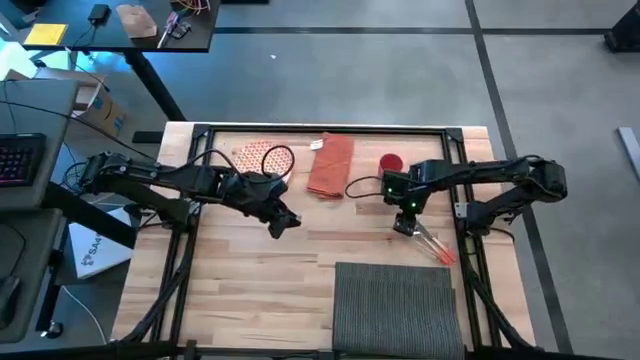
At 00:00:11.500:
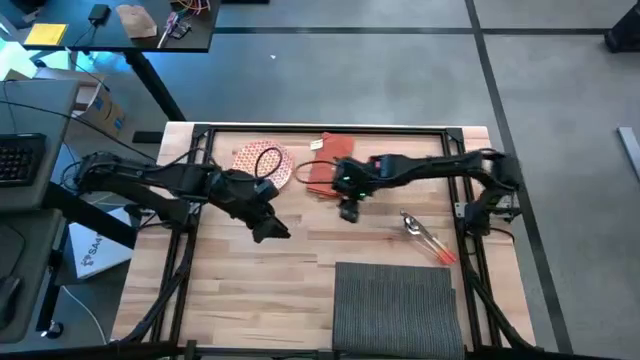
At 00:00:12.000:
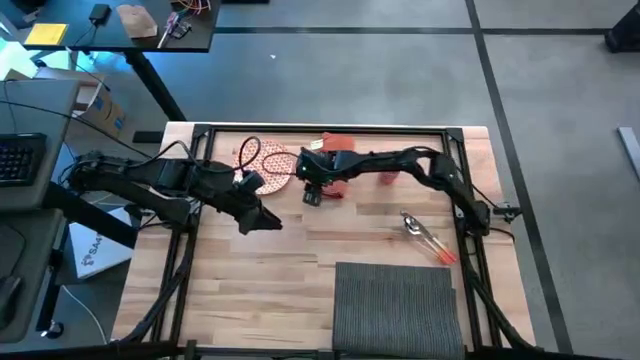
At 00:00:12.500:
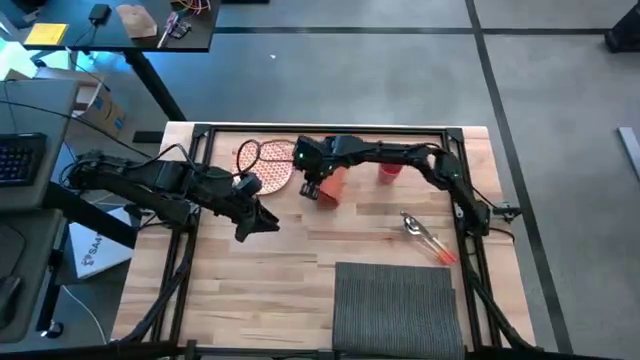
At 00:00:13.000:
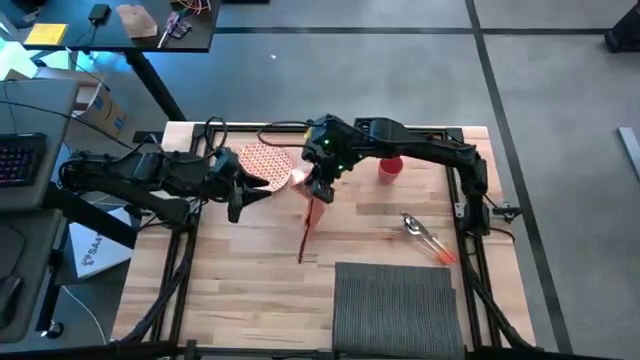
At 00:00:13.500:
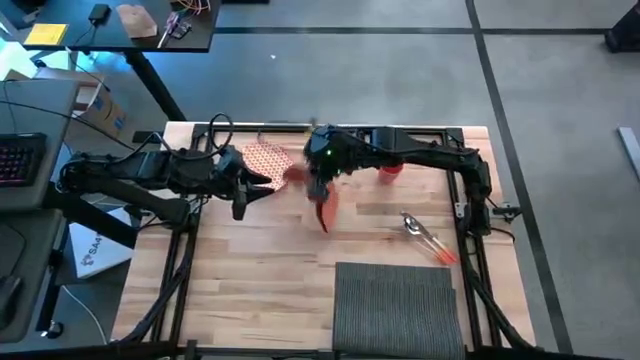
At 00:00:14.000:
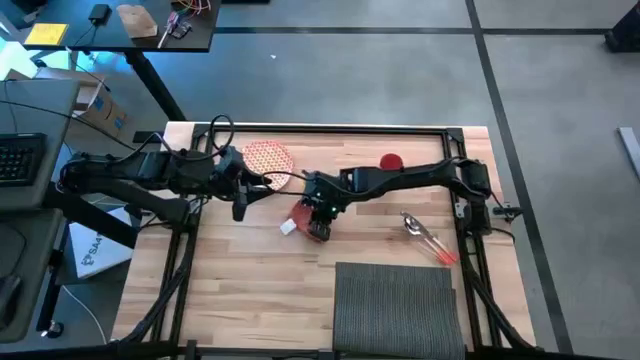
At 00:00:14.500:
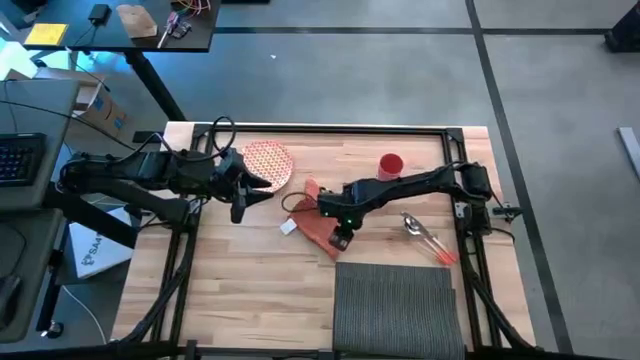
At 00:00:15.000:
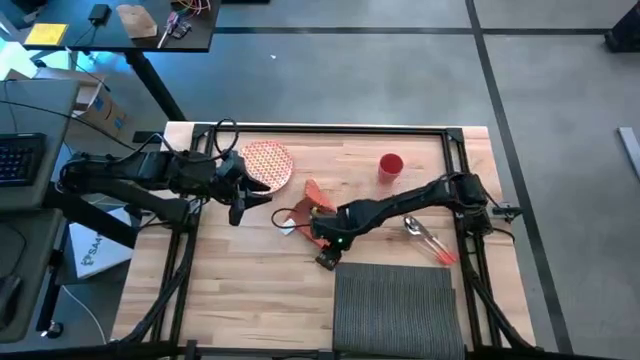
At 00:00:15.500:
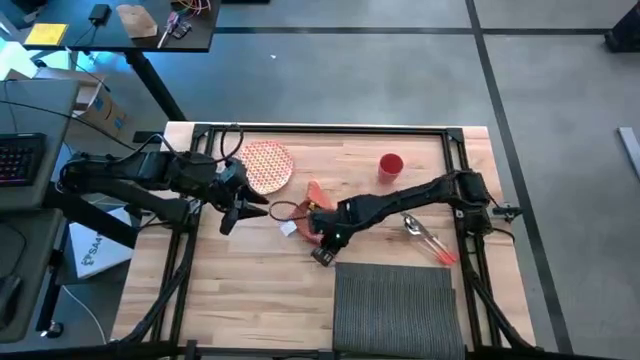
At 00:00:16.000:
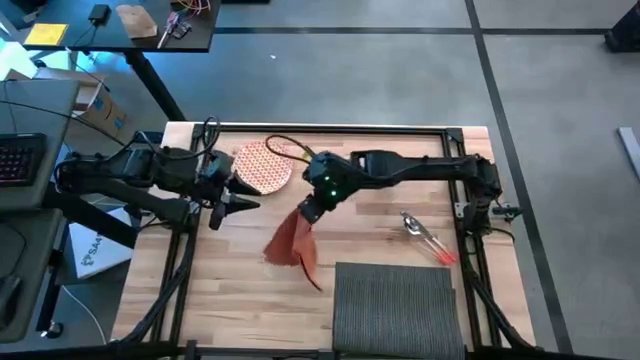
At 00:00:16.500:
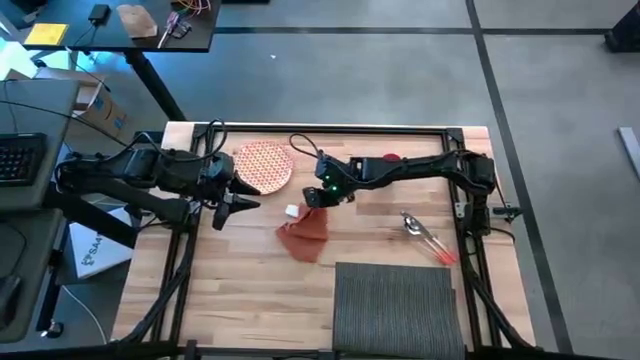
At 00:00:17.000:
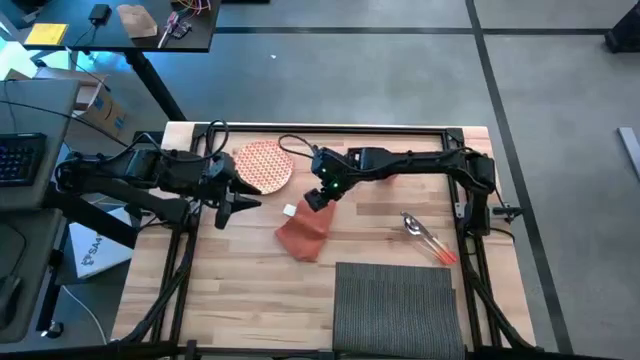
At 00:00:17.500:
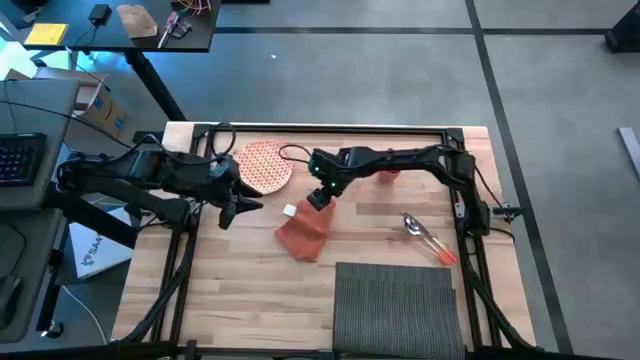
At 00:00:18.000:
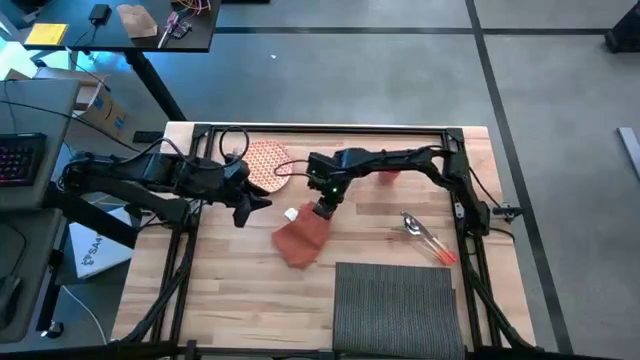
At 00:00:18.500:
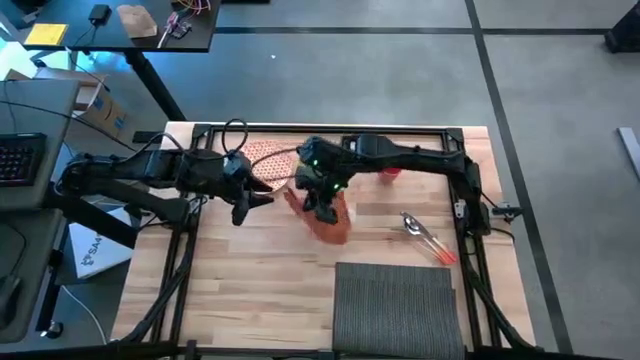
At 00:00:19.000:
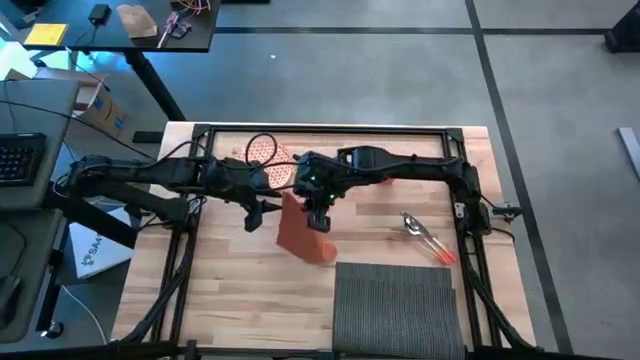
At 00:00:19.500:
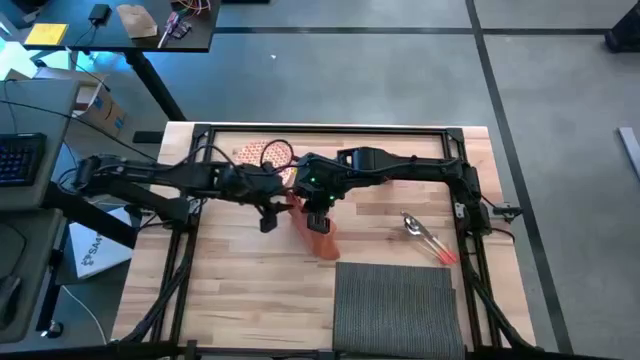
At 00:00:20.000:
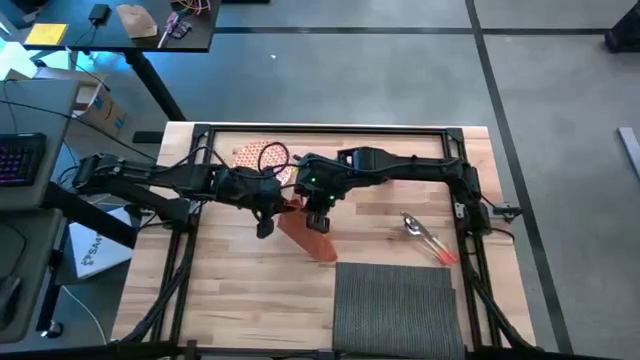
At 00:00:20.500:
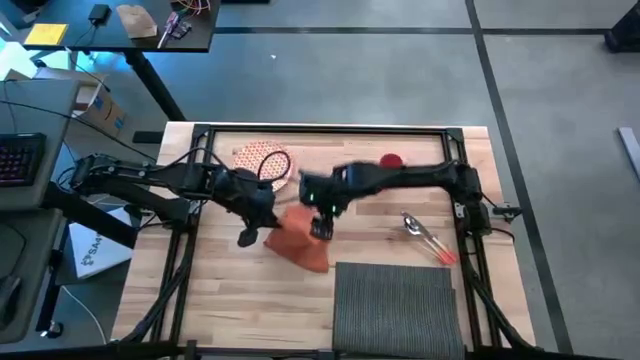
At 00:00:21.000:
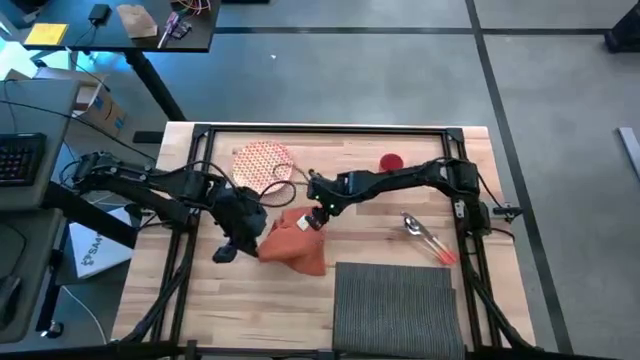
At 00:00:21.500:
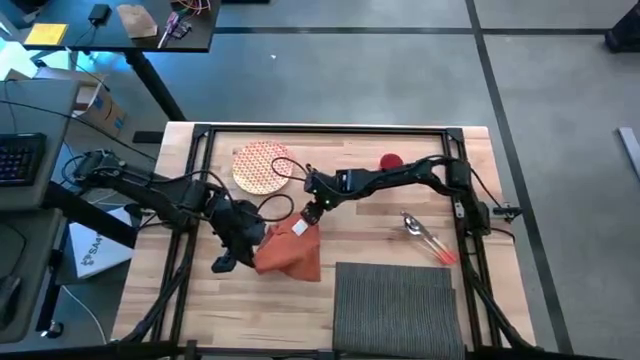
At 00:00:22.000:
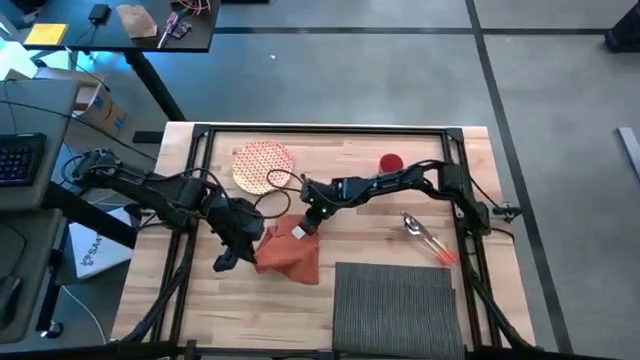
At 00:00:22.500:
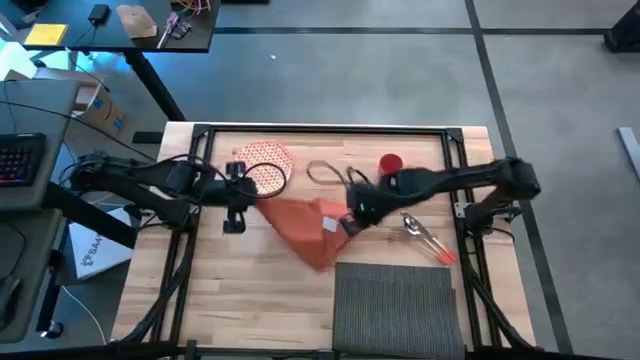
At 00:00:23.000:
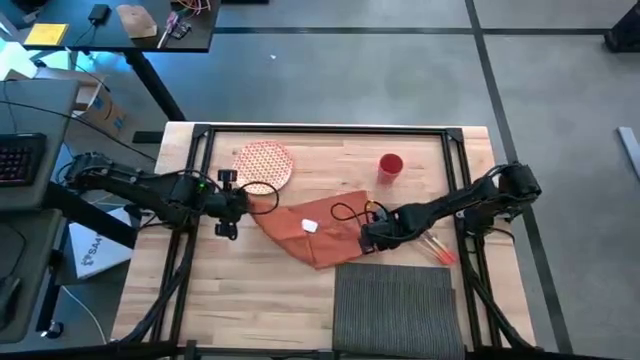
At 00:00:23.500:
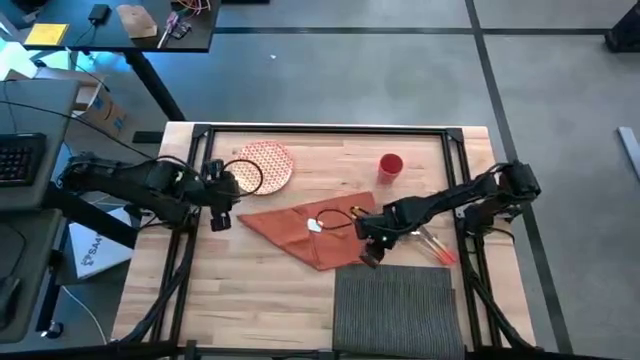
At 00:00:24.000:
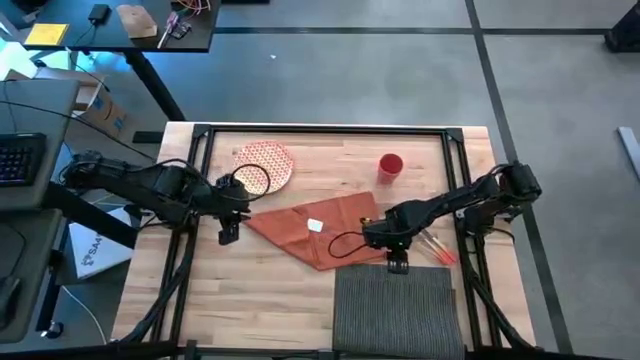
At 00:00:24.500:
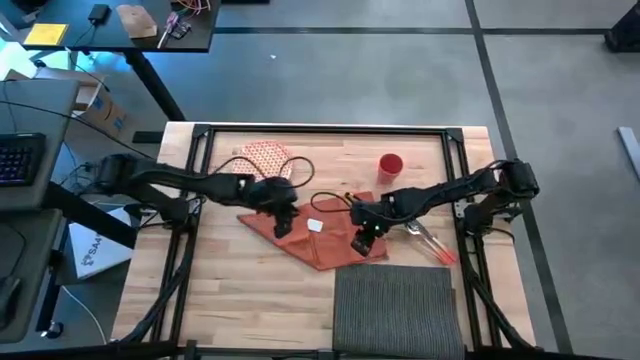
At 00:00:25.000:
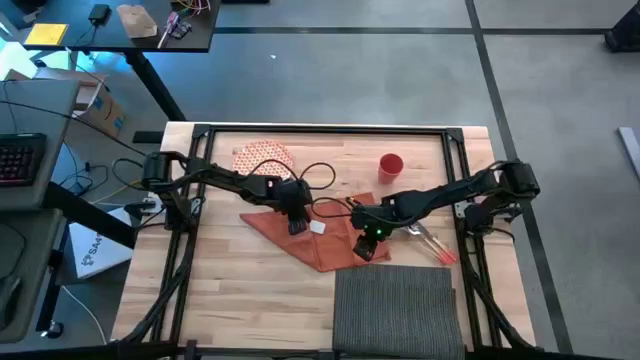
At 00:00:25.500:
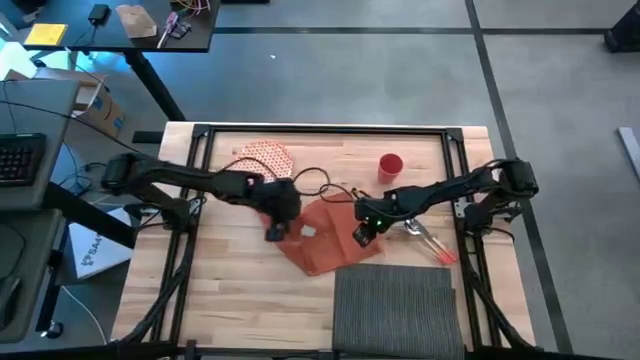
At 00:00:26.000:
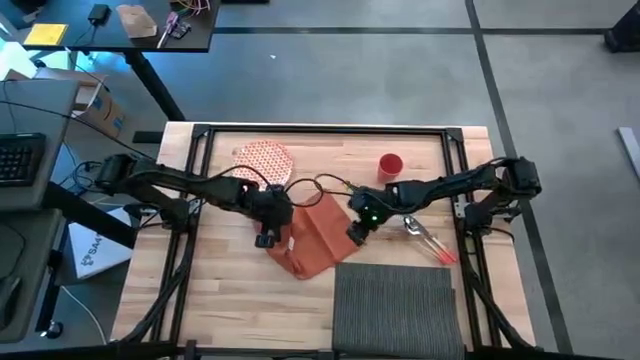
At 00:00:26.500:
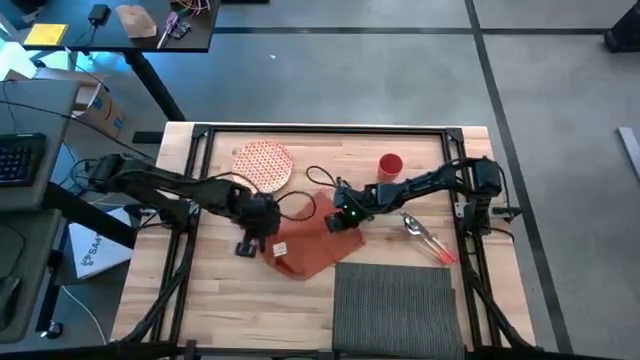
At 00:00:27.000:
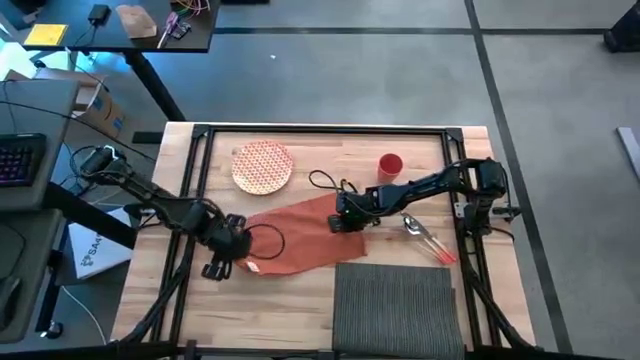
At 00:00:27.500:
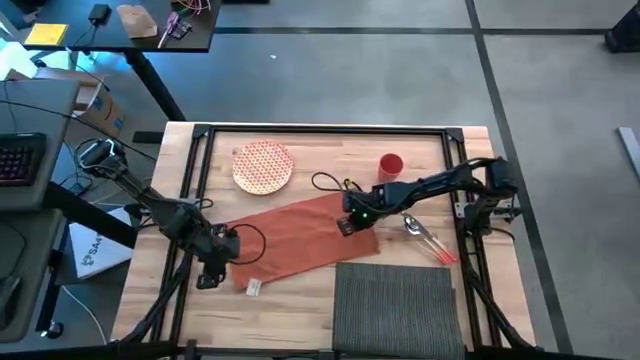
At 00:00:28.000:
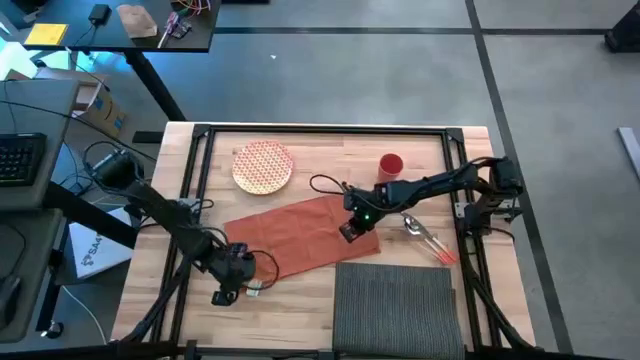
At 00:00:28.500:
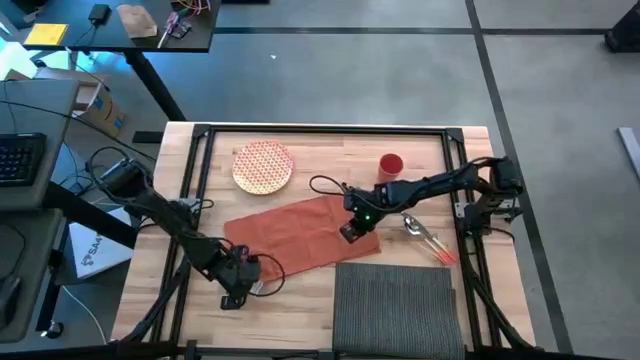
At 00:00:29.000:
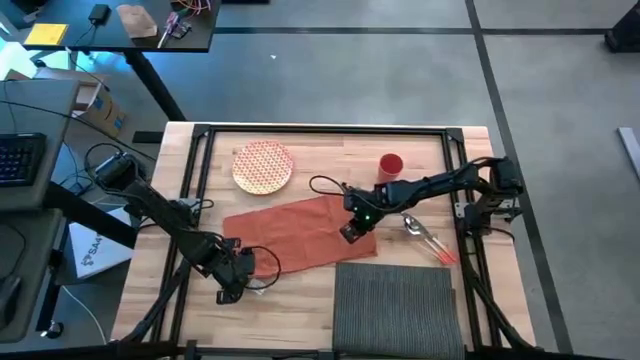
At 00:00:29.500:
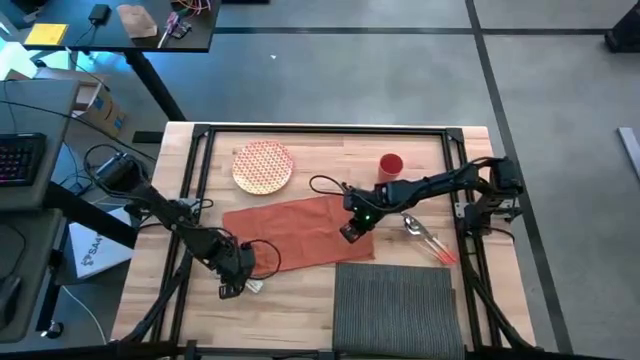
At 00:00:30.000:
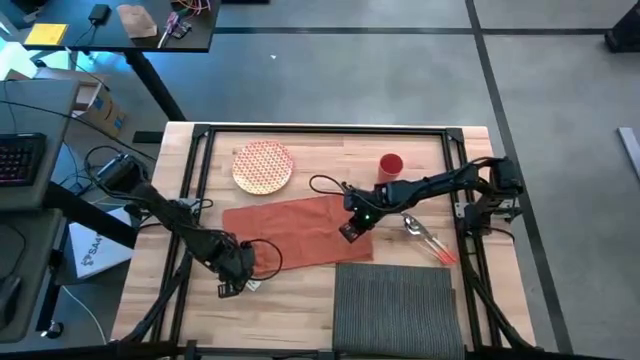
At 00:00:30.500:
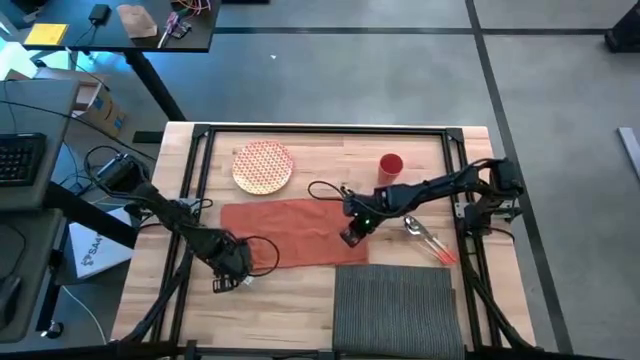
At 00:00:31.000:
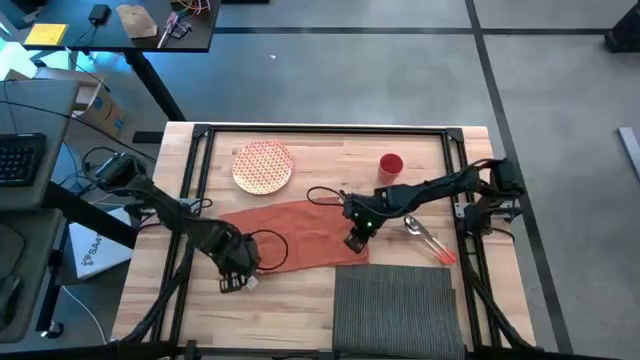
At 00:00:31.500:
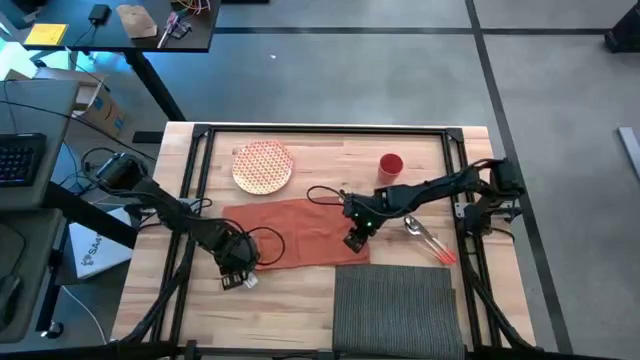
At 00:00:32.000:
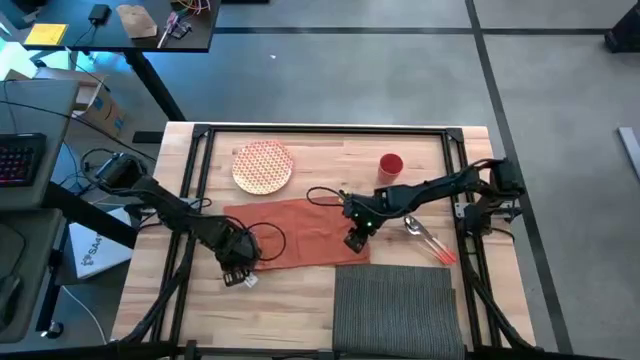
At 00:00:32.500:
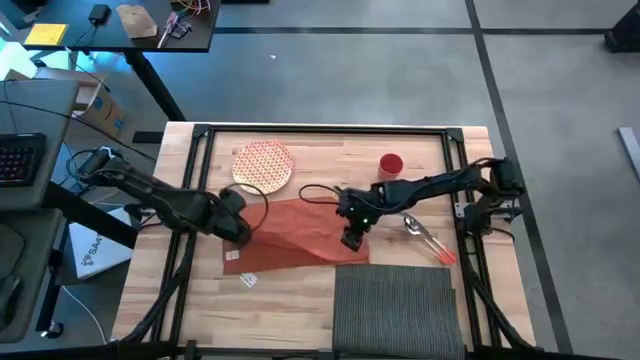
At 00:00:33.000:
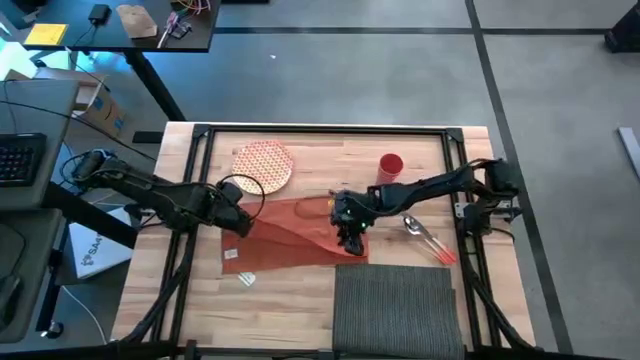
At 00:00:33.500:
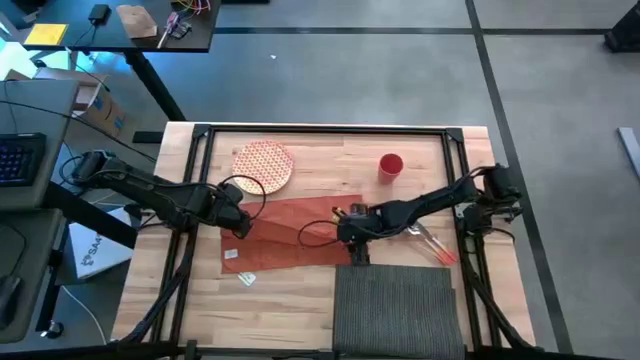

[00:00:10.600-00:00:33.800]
Task: Set table place
Fold the orange table napkin
